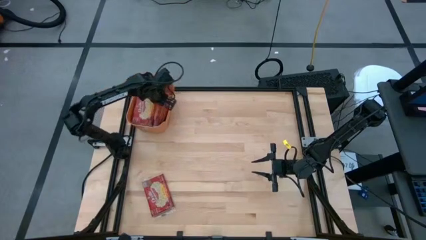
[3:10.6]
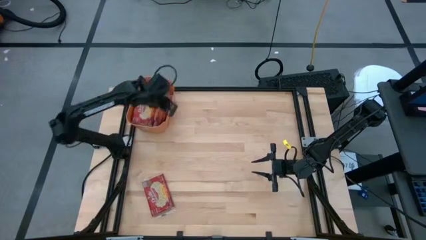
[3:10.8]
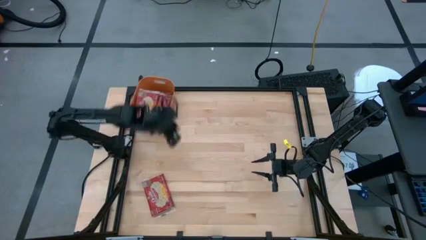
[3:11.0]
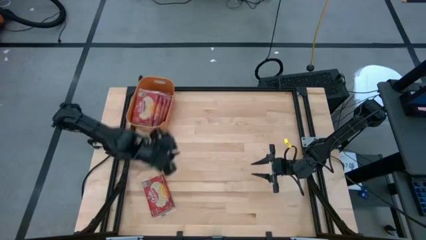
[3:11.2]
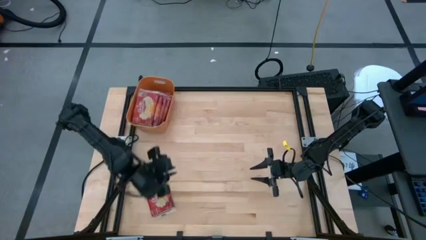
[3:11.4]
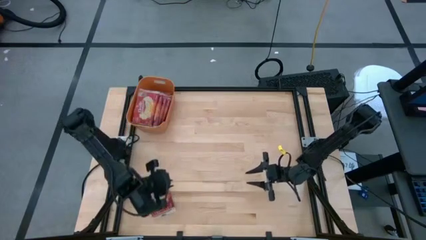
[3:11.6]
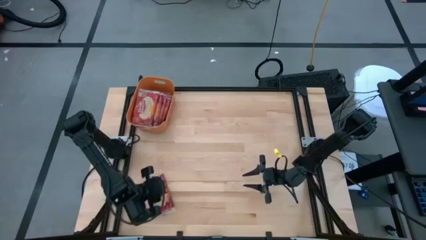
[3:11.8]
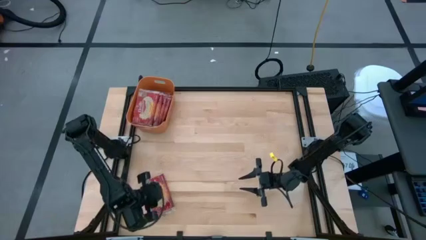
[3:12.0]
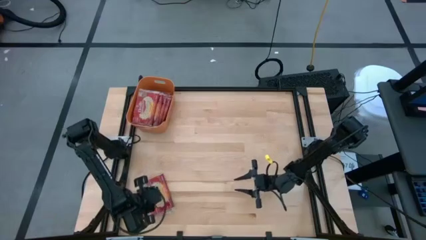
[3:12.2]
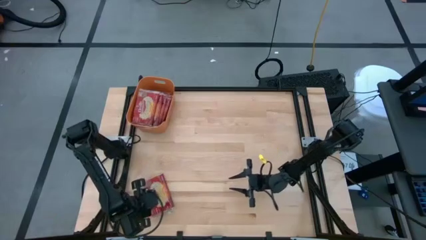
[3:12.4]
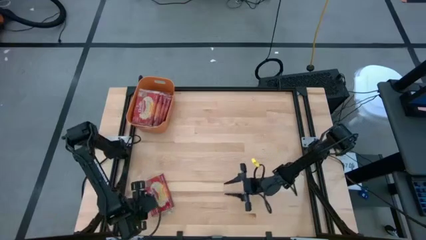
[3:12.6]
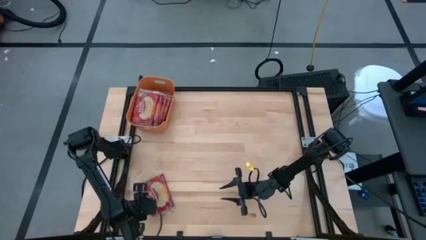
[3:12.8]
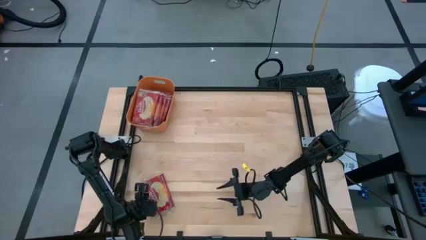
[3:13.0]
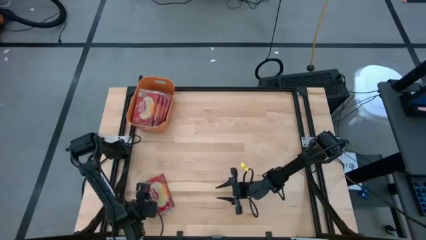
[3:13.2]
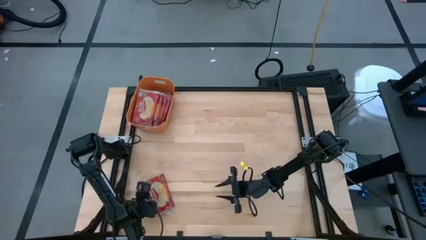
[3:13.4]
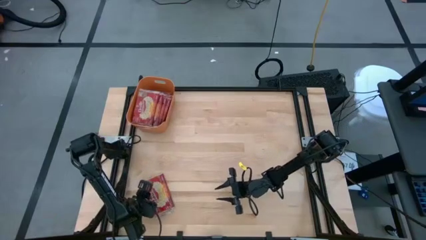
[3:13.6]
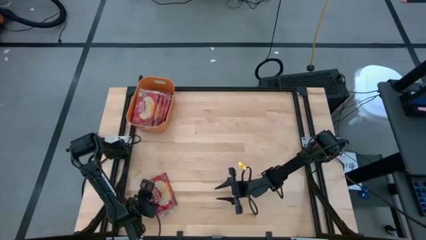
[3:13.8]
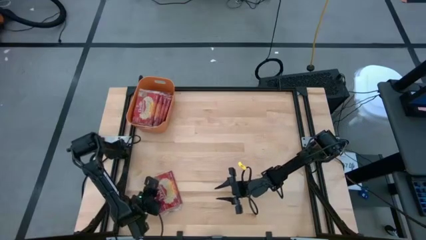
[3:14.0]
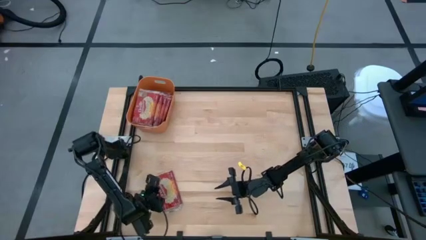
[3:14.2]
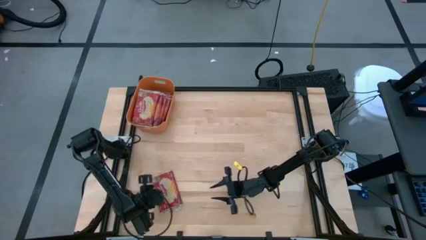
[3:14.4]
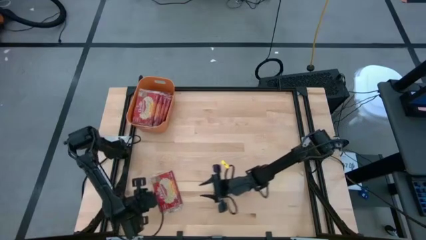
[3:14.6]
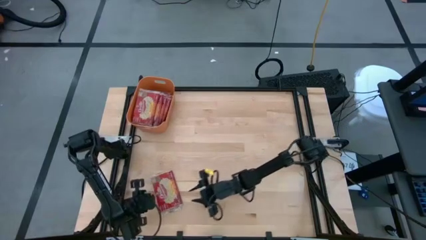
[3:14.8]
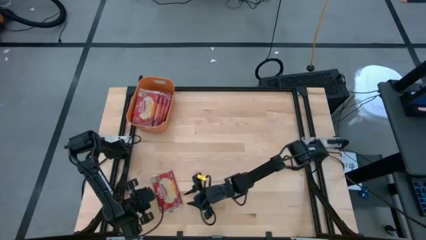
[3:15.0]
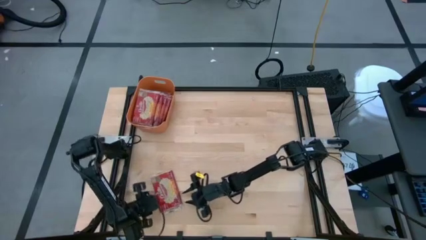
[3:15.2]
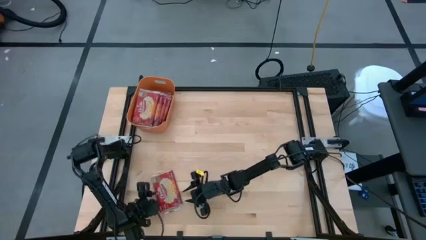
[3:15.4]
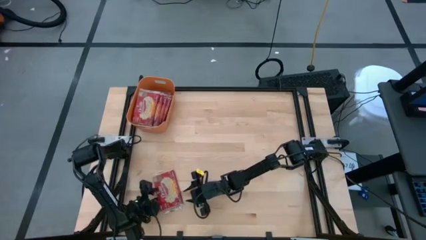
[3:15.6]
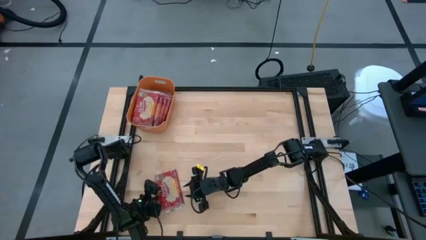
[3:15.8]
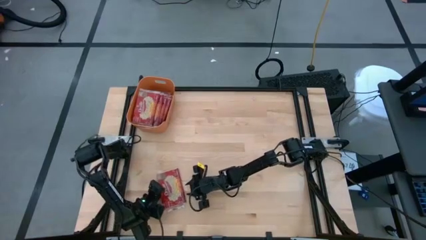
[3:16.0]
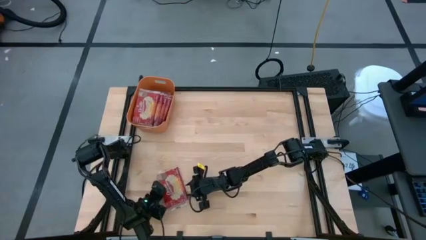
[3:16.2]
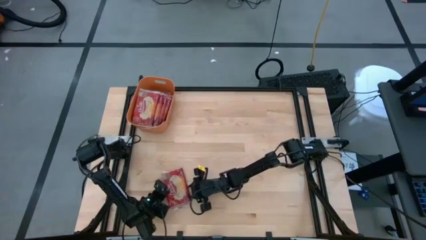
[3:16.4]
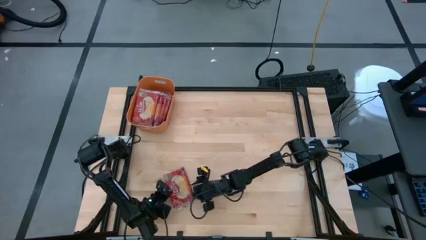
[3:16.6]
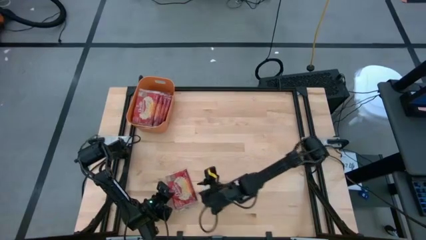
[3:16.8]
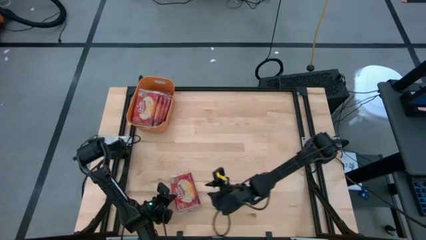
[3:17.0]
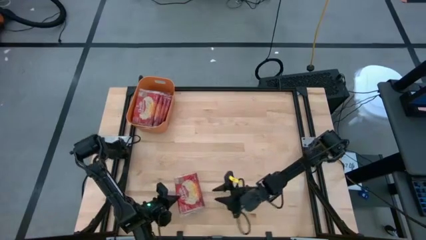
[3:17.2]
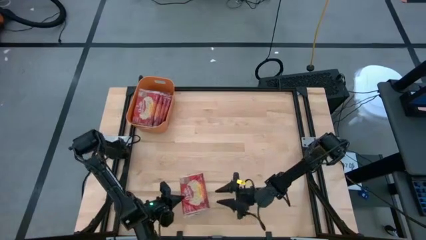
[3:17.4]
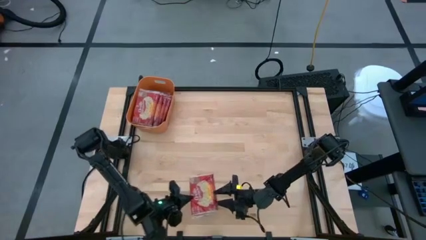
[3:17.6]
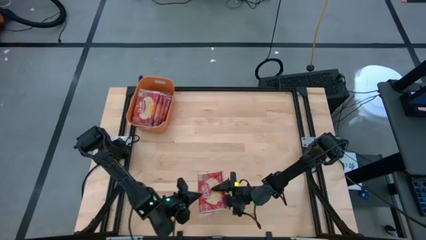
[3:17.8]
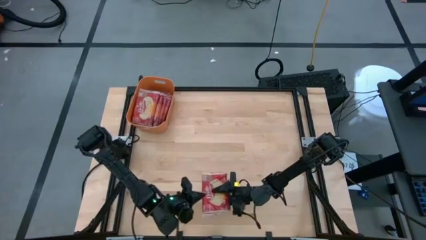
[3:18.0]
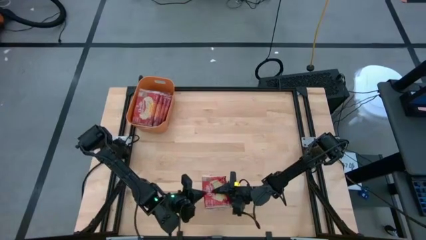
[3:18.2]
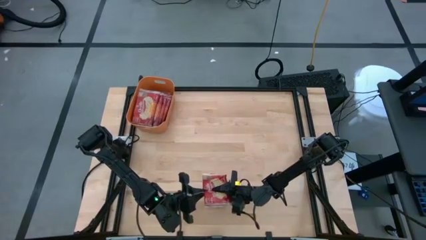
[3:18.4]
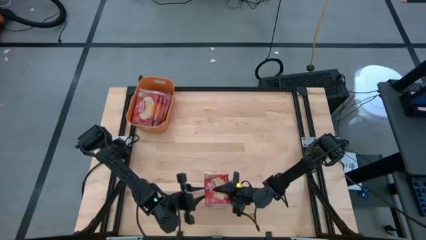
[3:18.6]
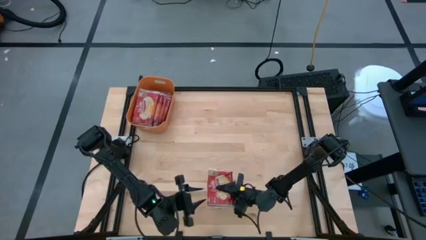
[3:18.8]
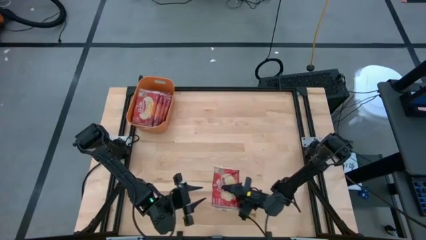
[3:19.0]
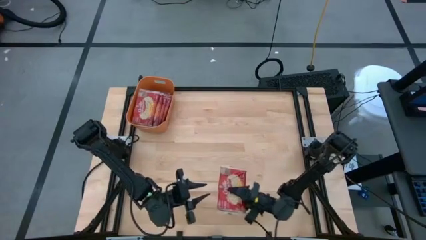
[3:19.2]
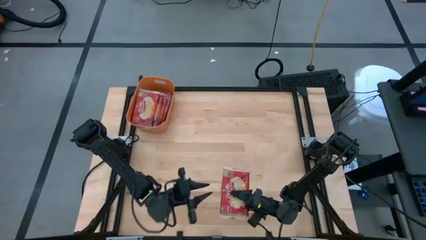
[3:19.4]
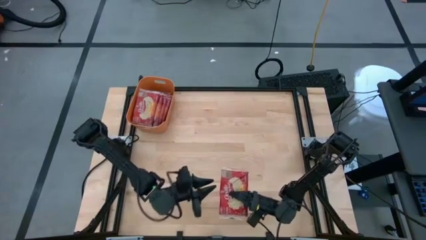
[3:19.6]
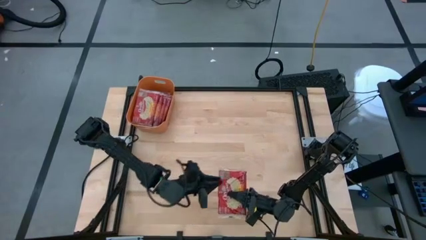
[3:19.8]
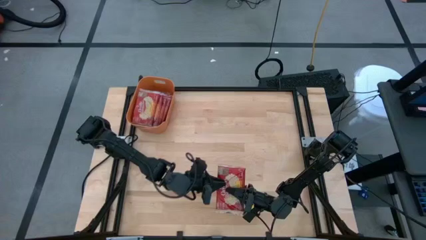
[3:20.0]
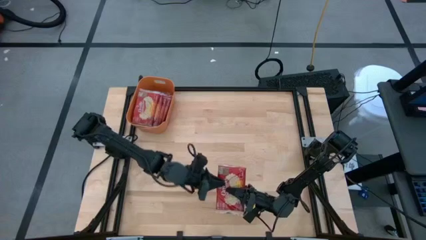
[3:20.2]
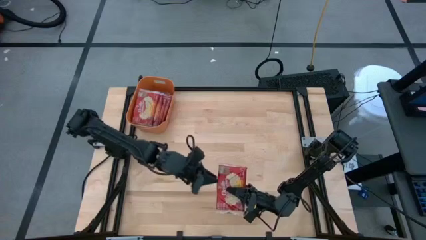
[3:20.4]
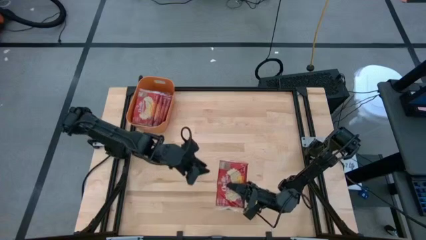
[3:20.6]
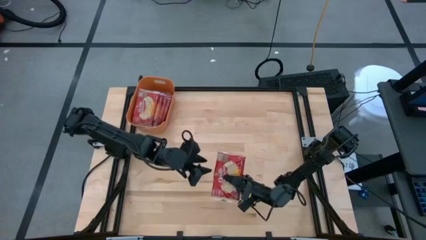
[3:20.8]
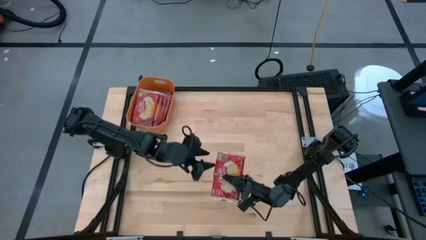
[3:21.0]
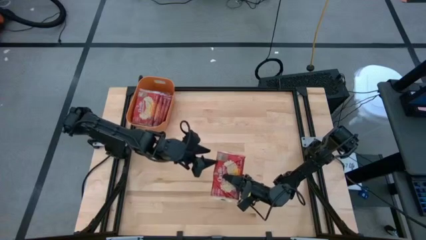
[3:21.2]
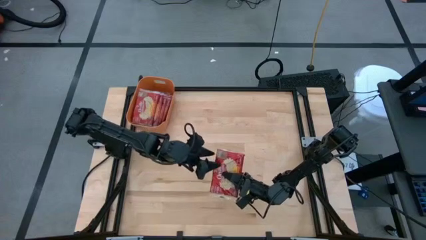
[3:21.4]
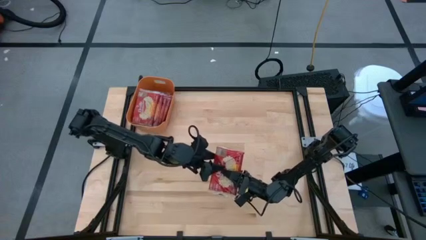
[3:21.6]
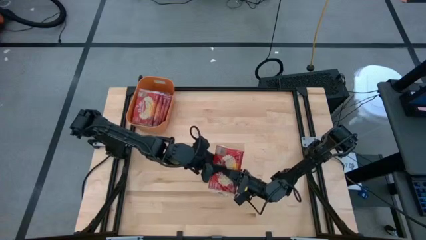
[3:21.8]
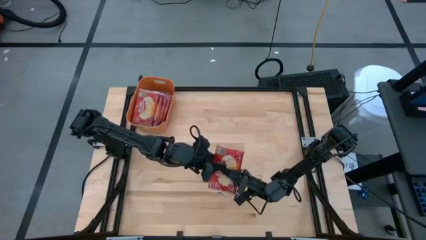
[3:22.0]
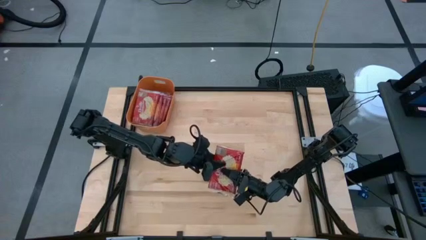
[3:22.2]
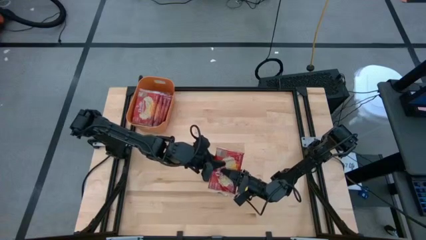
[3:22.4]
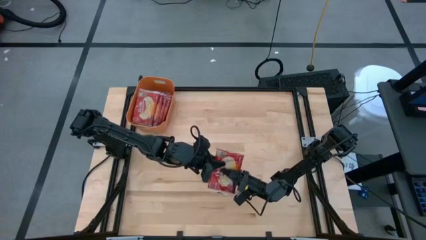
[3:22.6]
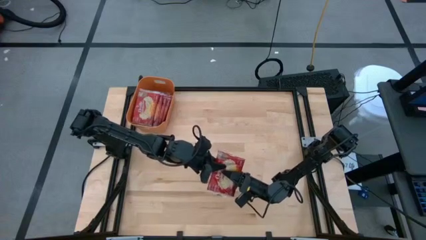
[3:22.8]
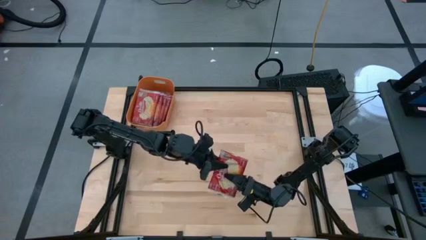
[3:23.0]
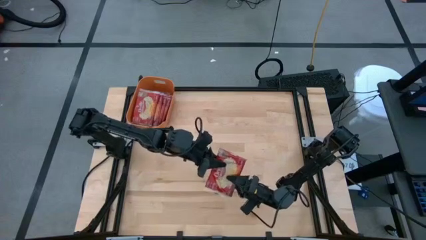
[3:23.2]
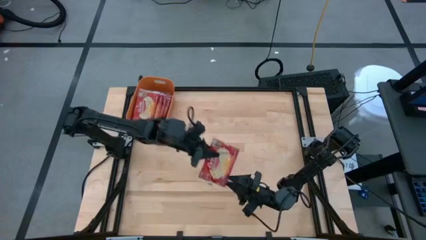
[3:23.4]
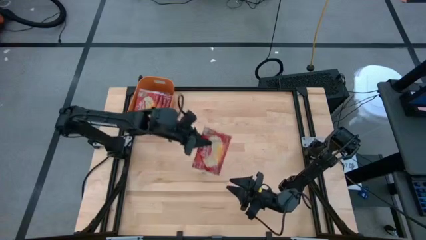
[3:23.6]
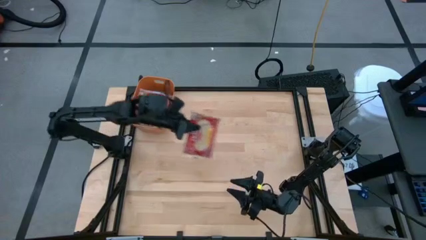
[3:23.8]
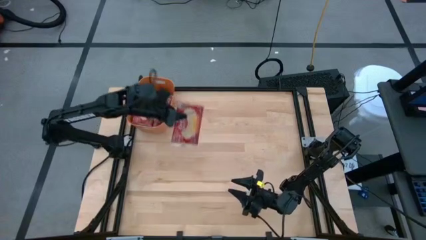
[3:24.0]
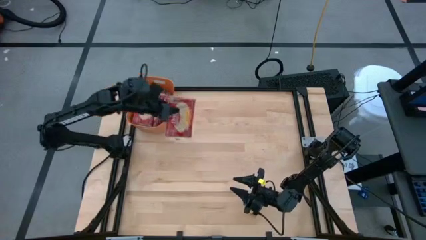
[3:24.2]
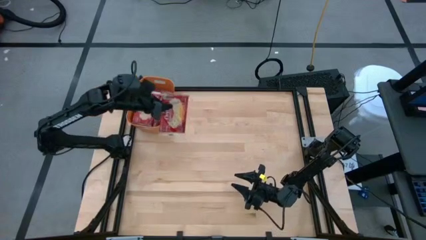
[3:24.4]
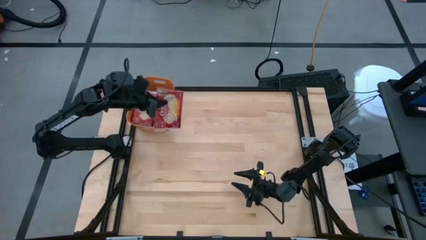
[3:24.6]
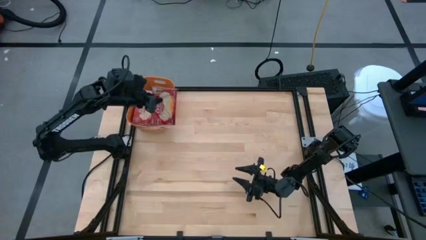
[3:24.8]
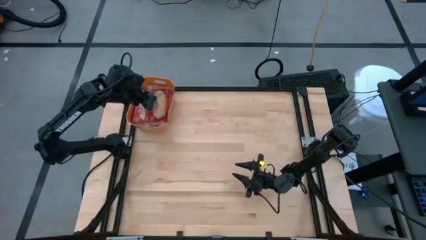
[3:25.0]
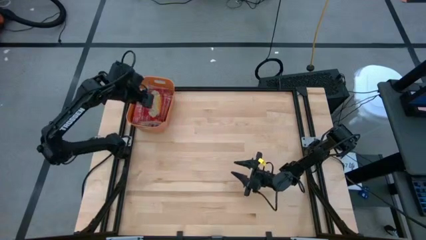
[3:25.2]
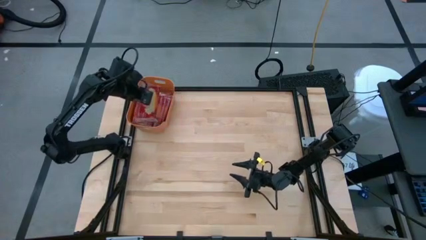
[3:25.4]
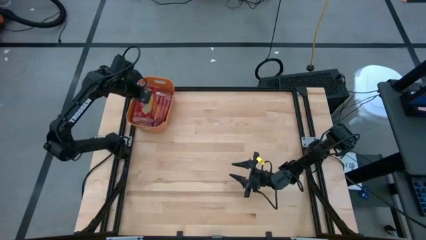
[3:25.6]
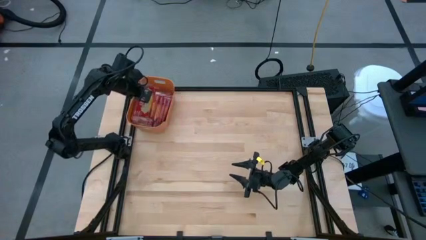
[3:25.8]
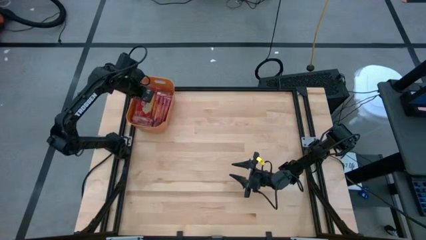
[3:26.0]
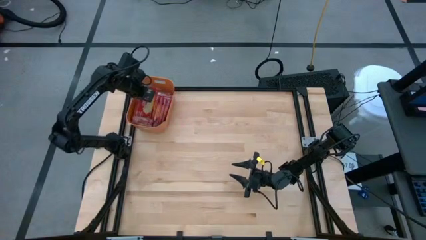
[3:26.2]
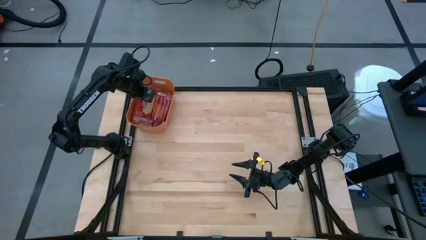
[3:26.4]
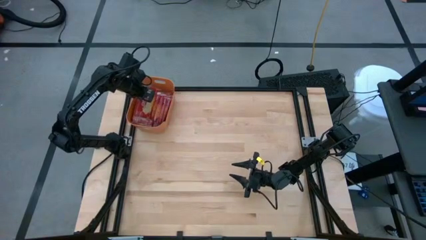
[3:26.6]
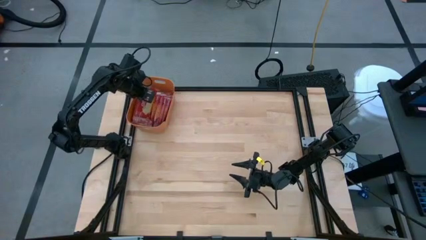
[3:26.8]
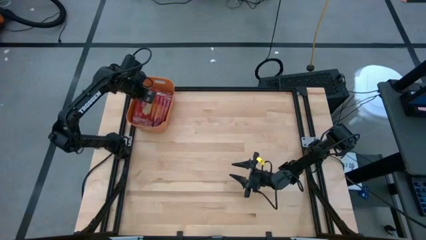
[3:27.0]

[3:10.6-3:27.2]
Task: Sort popcorn bags into baskets
Put the red popcorn bag into the orange bin

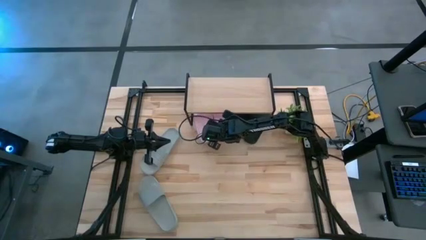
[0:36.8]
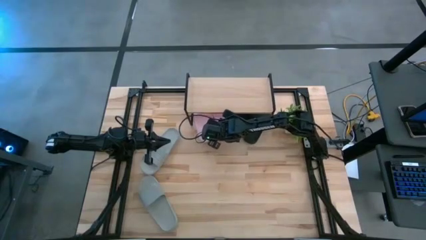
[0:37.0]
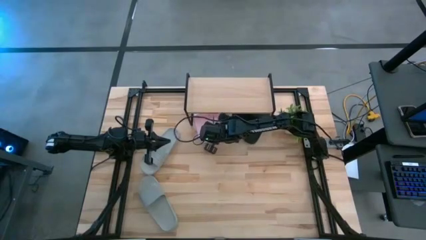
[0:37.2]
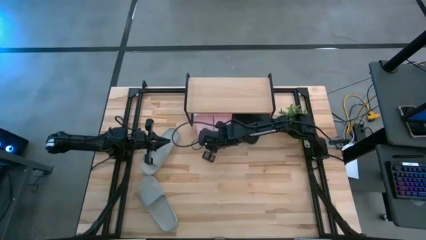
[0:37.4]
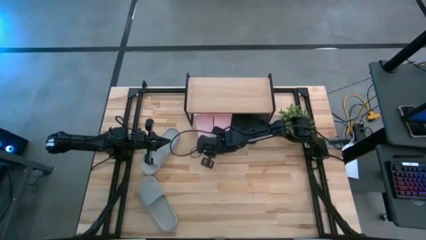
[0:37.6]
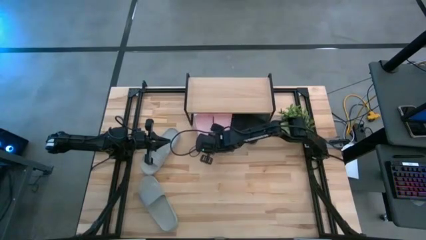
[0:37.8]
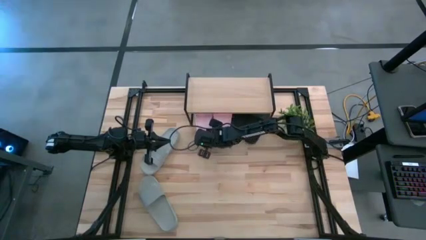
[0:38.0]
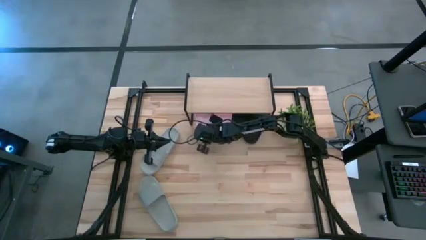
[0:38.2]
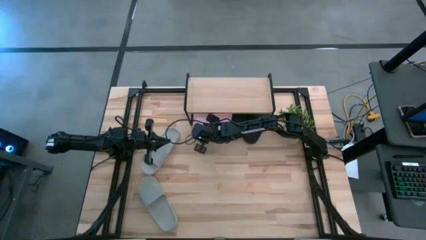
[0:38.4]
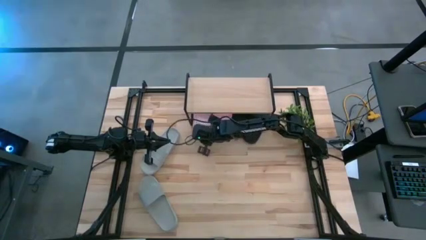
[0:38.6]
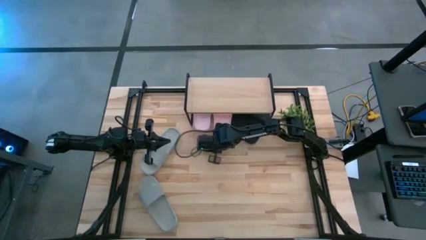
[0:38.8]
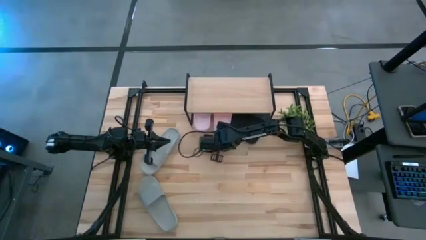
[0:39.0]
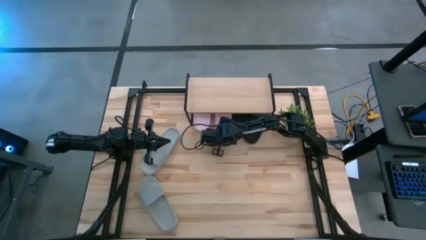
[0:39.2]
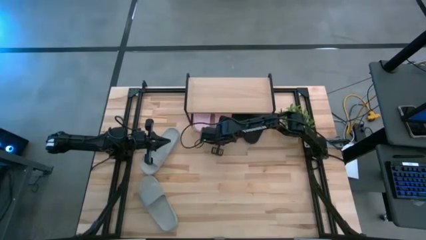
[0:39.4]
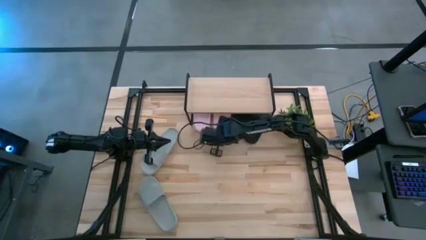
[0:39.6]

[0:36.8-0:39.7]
Task: Pick and place slides into the shelf
Adjust the pink slides under the shelf
